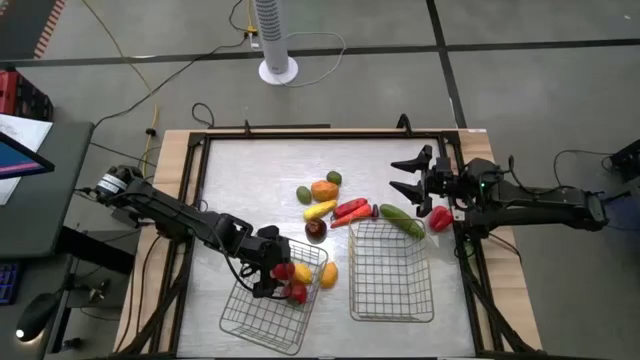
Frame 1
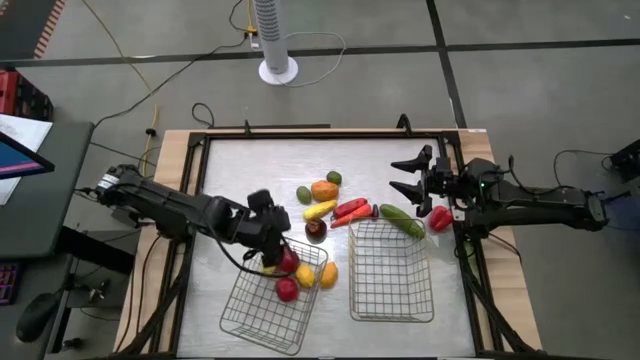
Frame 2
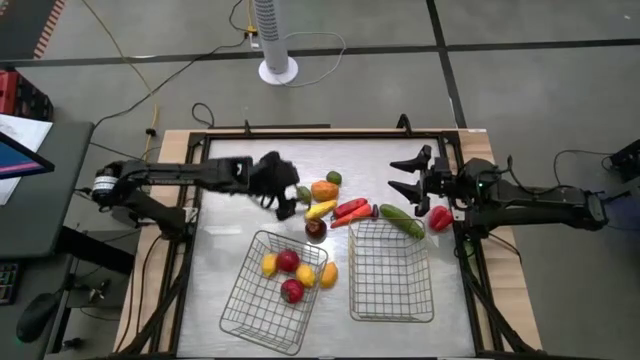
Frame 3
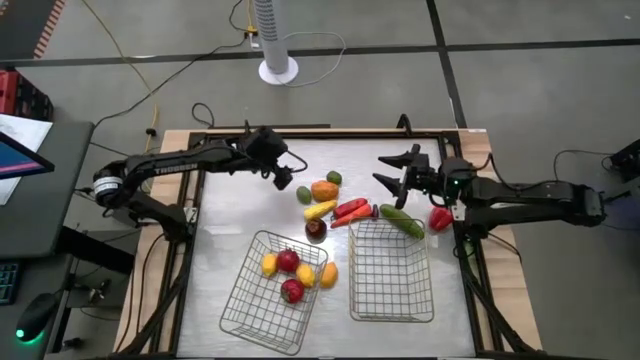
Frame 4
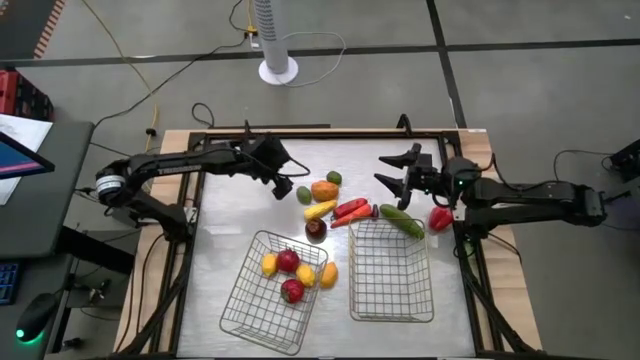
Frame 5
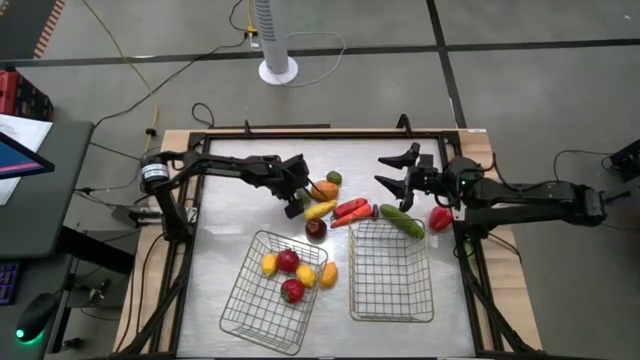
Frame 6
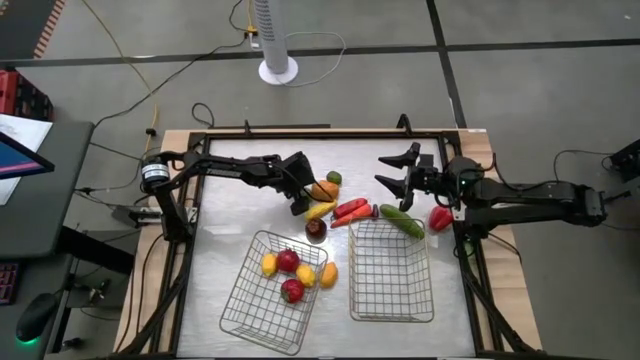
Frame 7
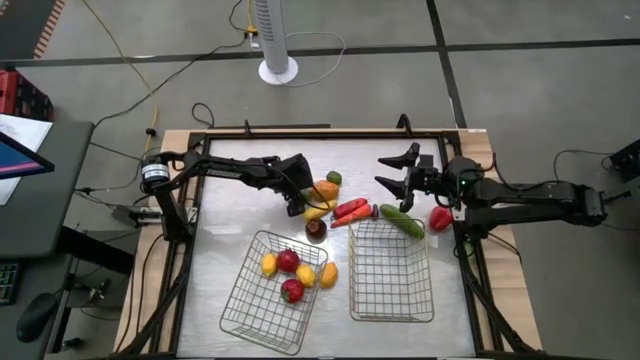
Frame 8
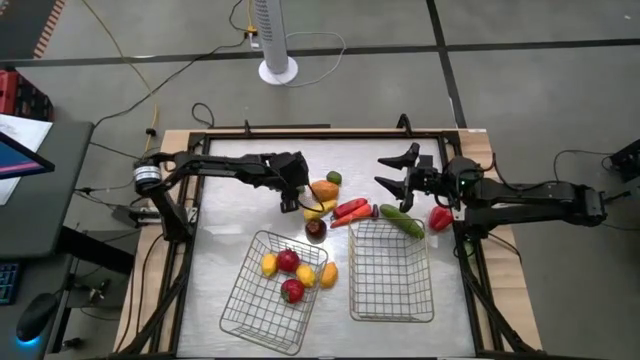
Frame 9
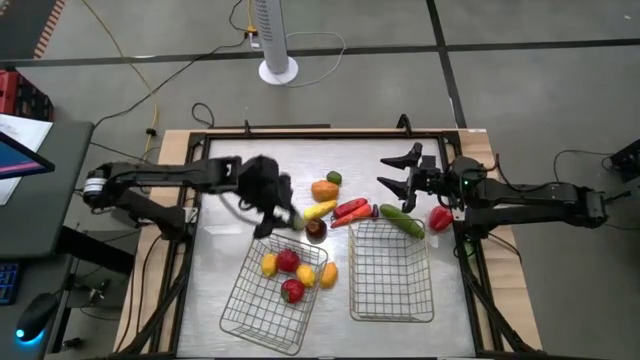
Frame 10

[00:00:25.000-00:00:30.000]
Task: Sort produce into baskets
Put the bottom green lime into the left wire basket

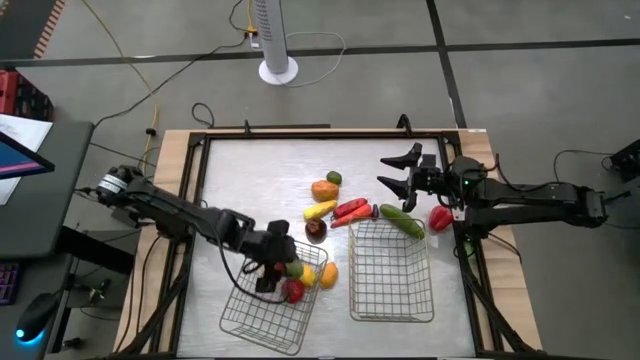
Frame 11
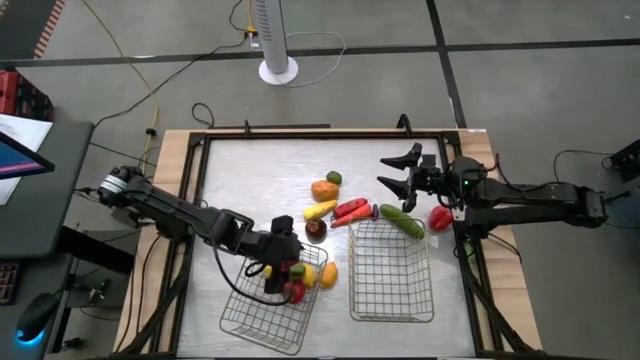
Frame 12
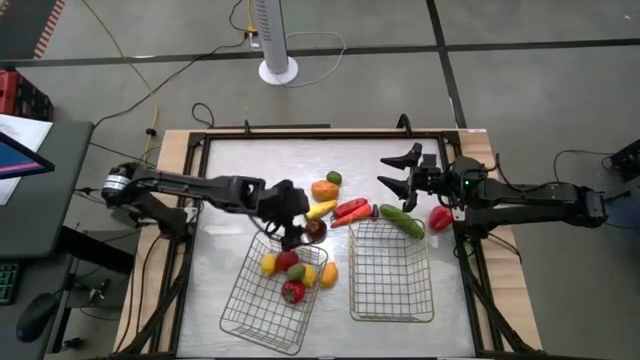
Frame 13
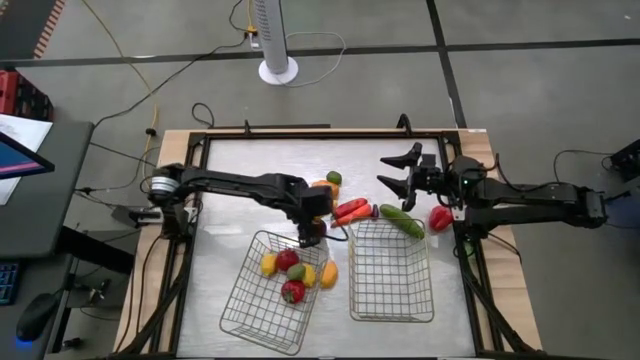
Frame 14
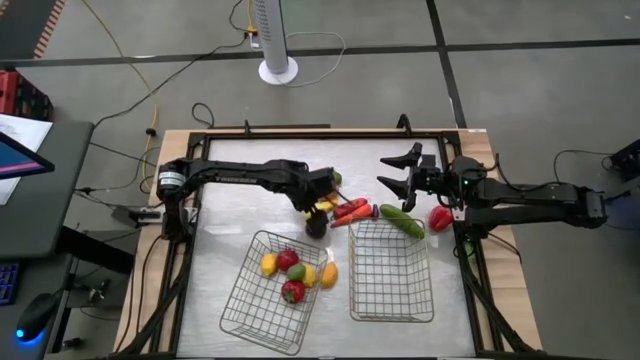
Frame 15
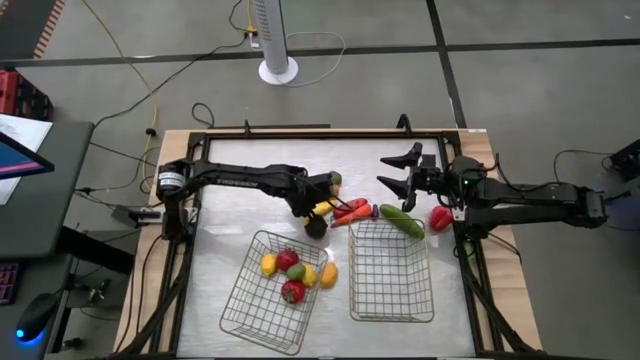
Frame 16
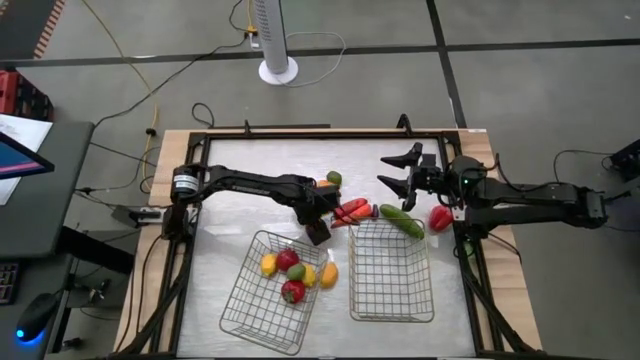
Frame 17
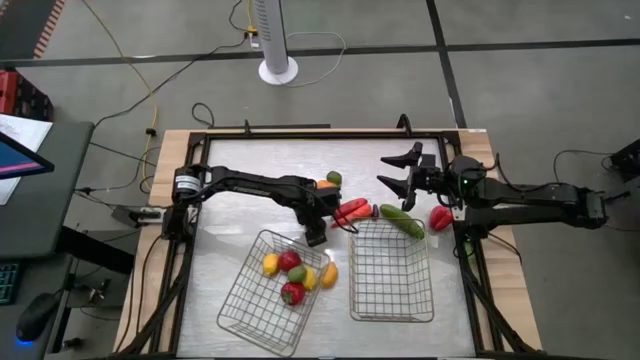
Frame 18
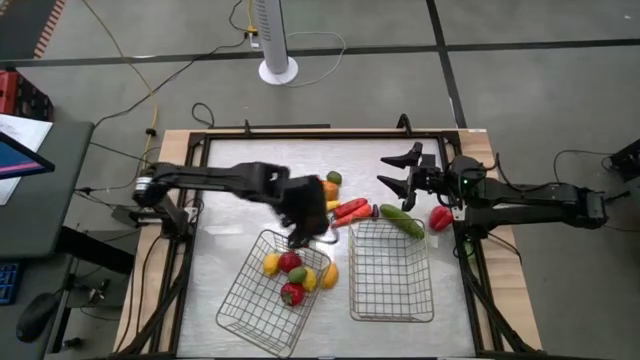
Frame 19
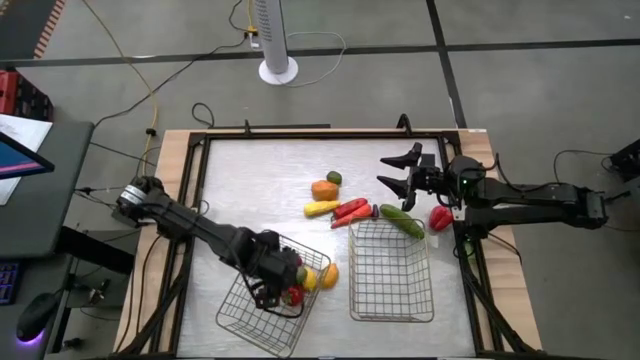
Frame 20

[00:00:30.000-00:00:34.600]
Put the red apple into the left wire basket

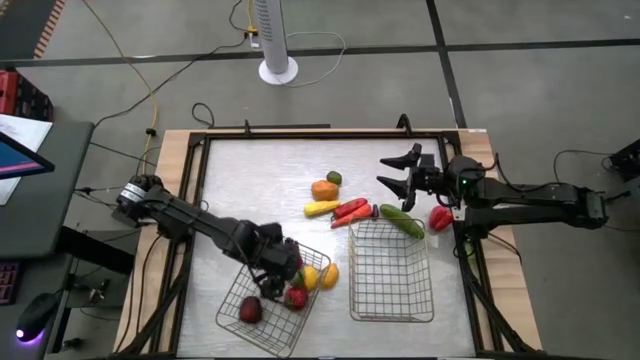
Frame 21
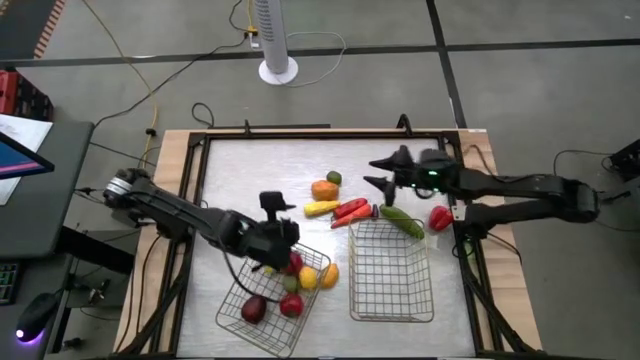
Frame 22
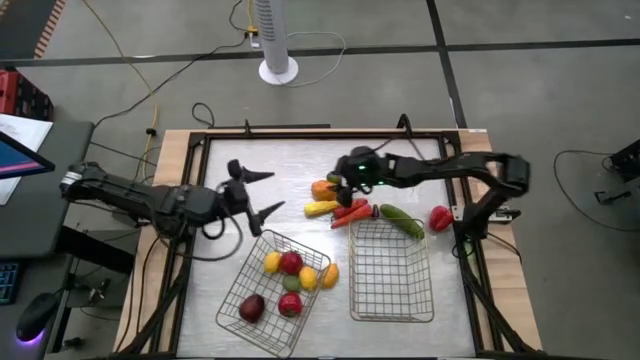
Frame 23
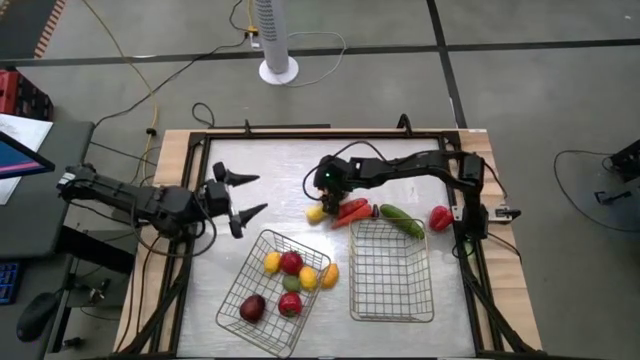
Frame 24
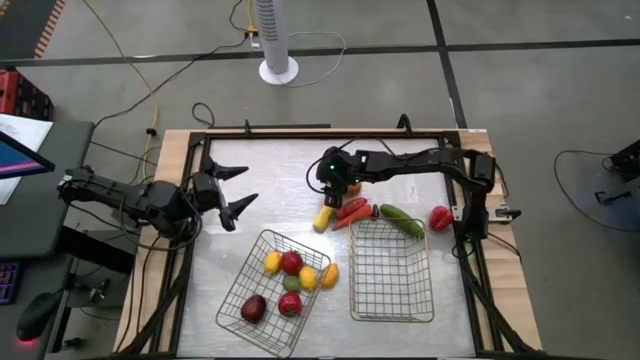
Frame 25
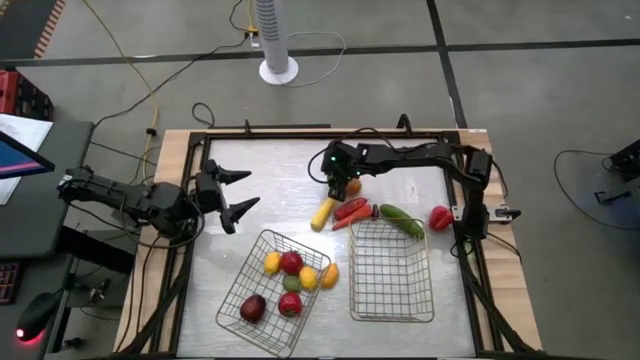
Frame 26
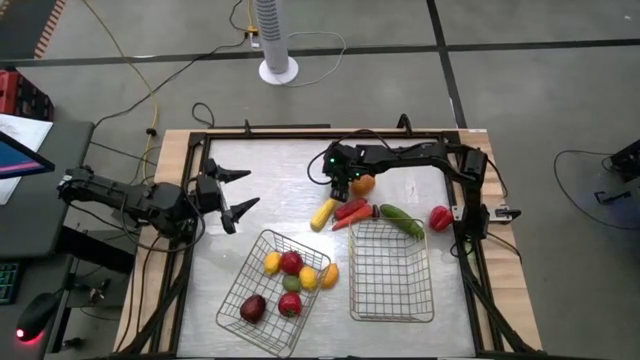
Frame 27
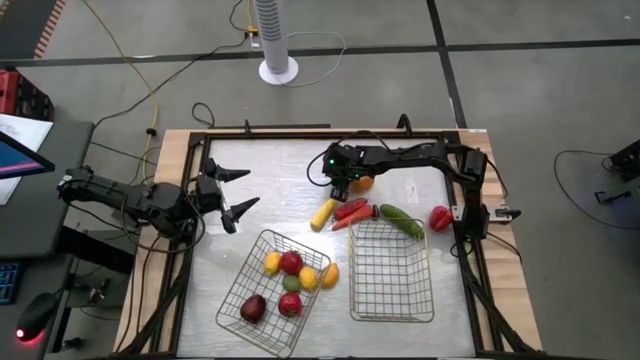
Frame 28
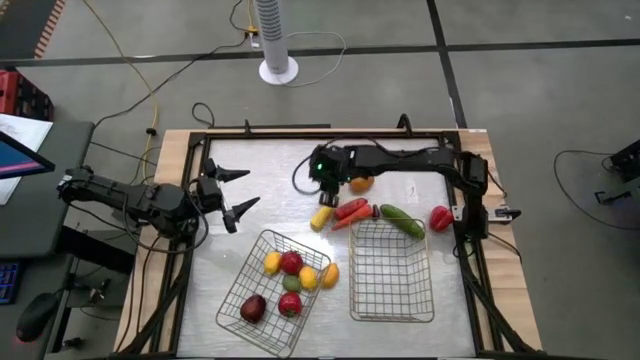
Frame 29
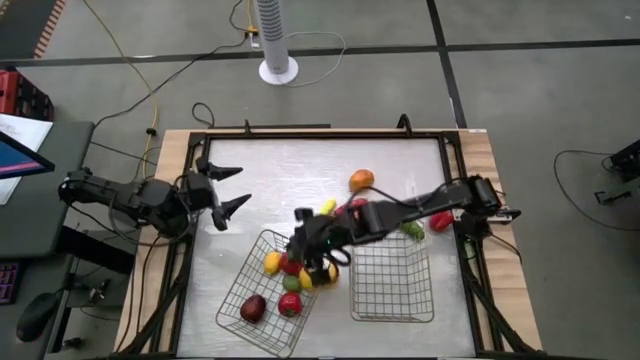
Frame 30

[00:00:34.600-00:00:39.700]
Put the lime into the left wire basket

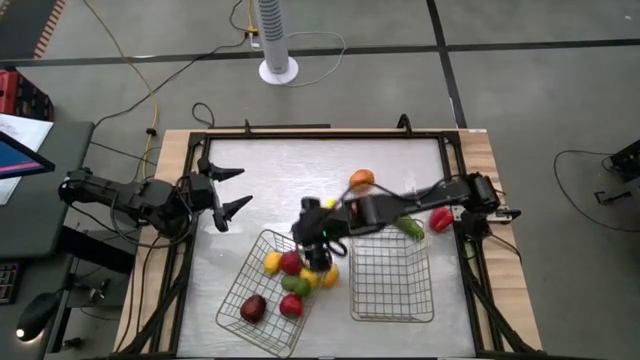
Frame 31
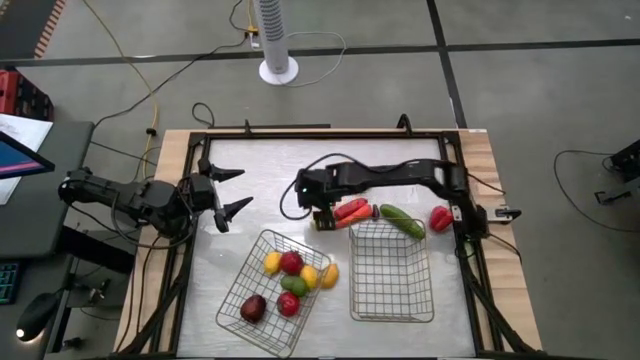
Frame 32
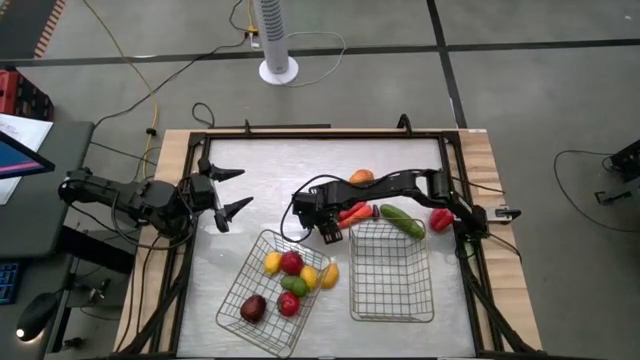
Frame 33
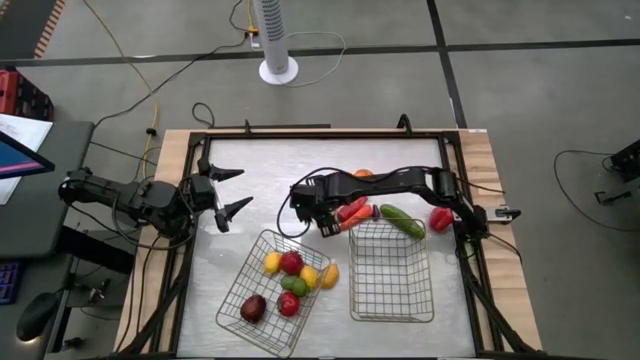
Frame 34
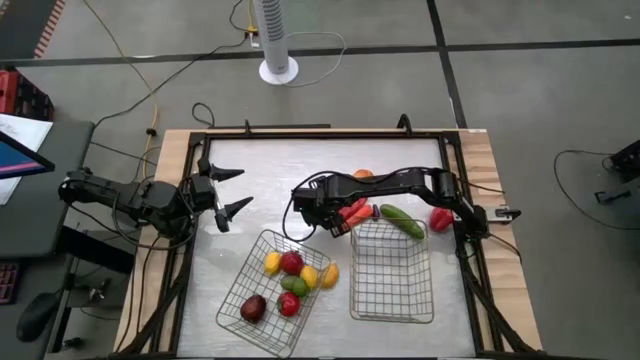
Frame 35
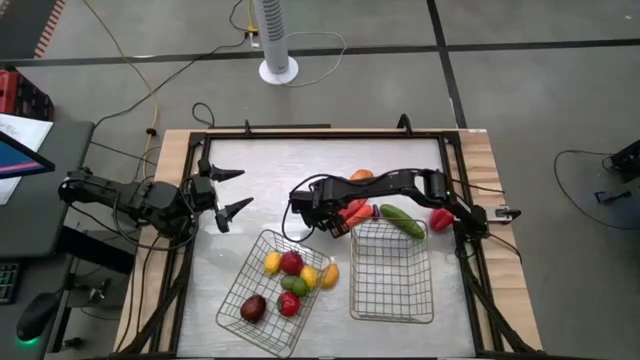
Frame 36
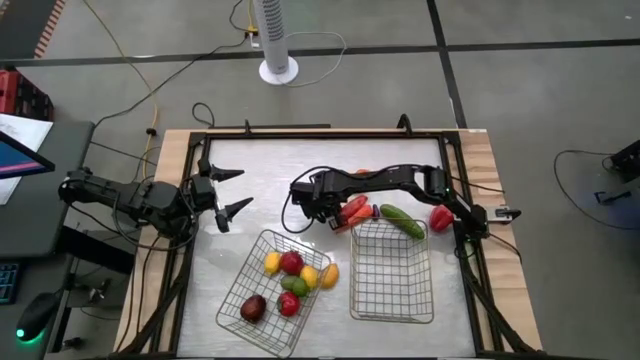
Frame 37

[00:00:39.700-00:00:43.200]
Put the yellow corn into the right wire basket

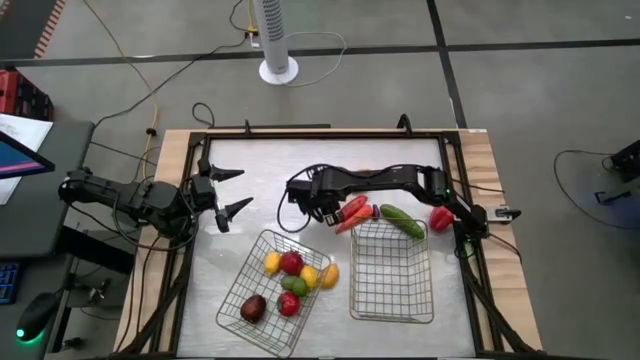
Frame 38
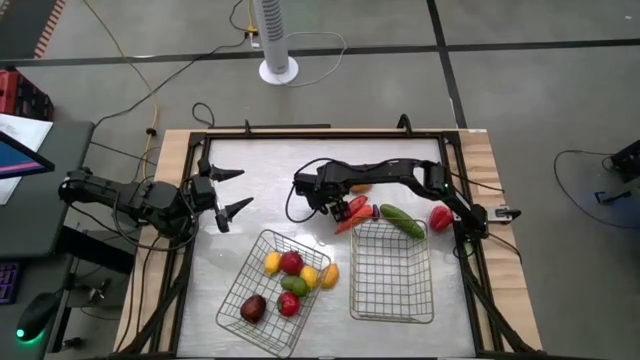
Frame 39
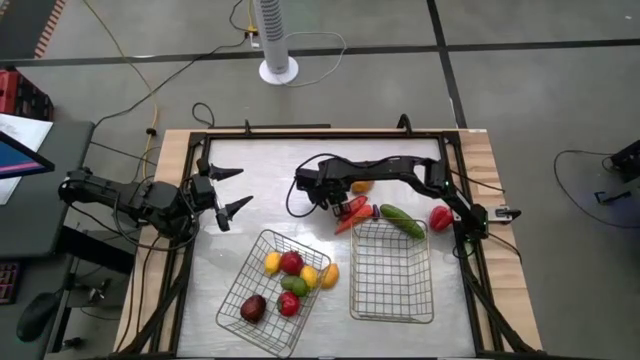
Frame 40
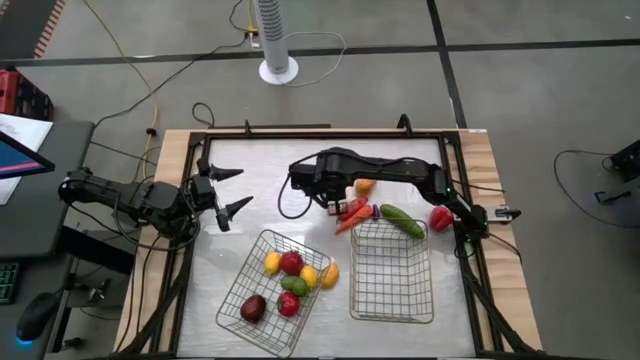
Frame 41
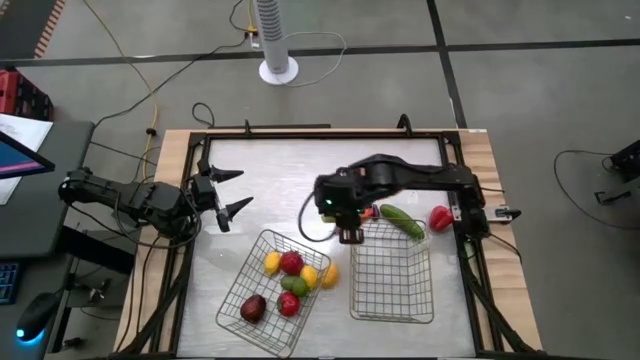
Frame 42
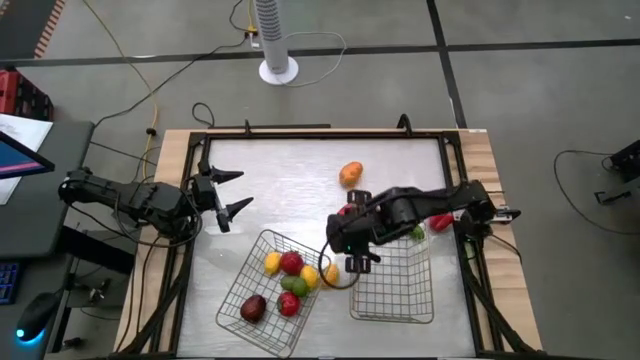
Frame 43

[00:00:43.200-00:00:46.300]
Put the yellow corn into the right wire basket
